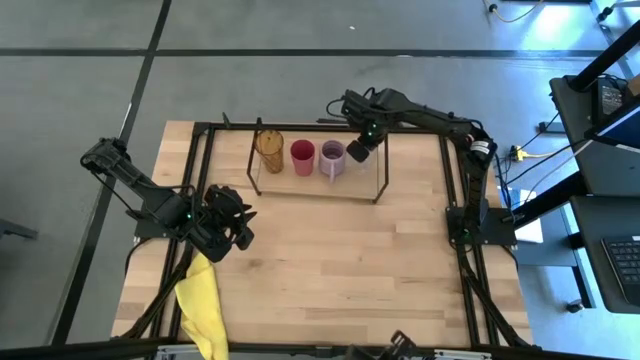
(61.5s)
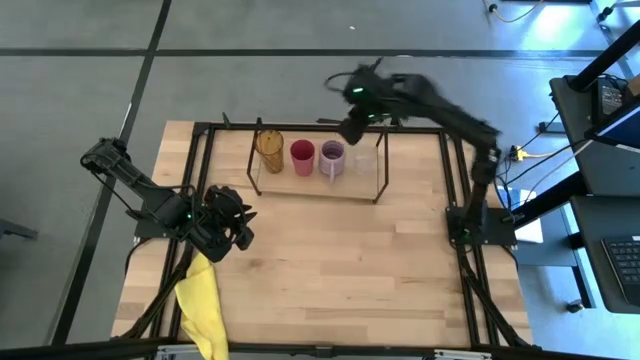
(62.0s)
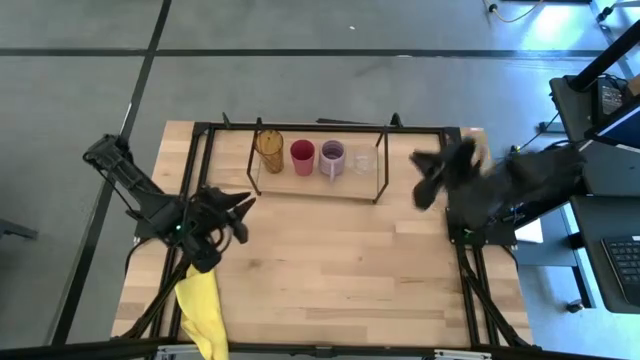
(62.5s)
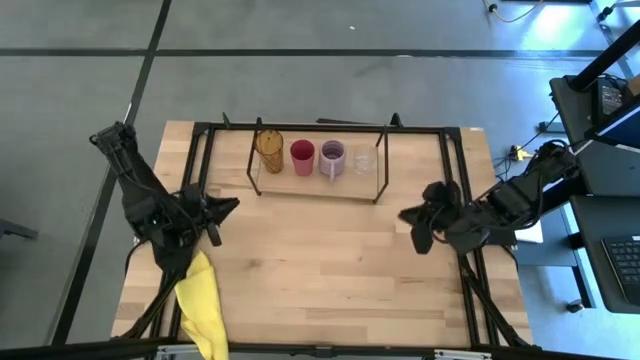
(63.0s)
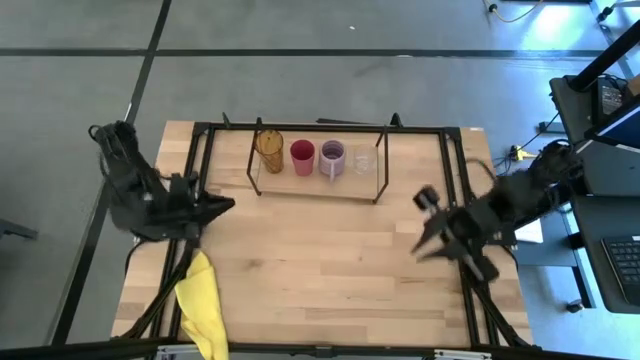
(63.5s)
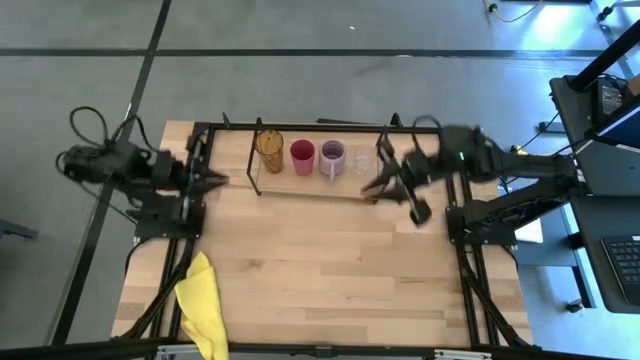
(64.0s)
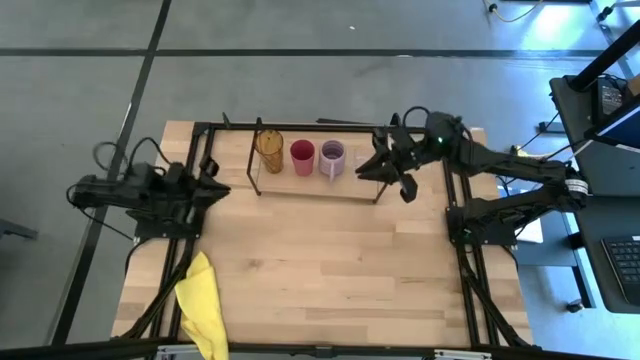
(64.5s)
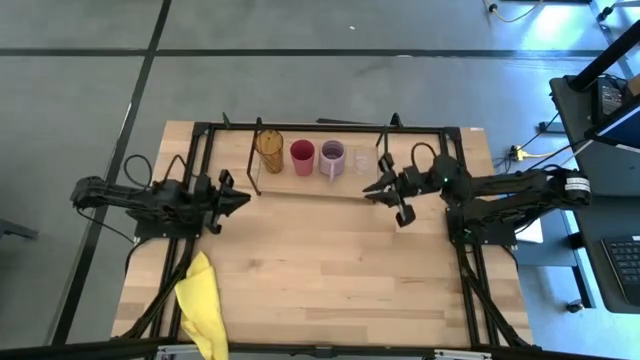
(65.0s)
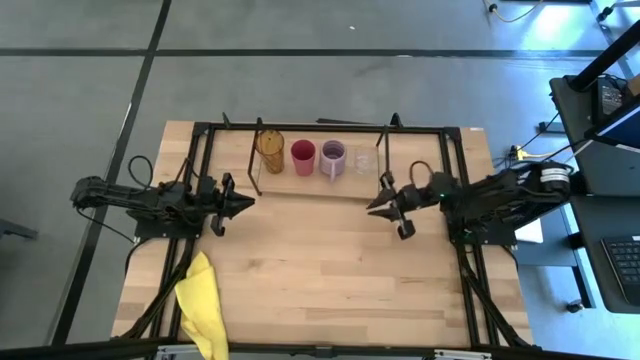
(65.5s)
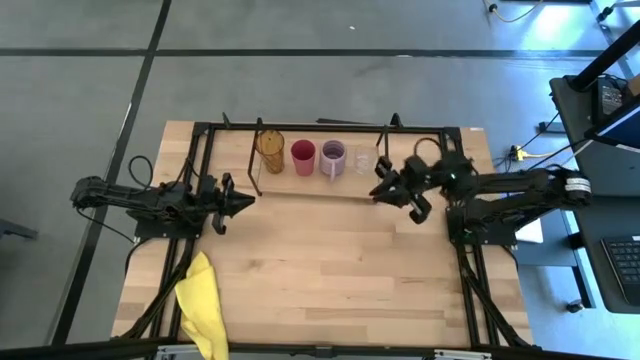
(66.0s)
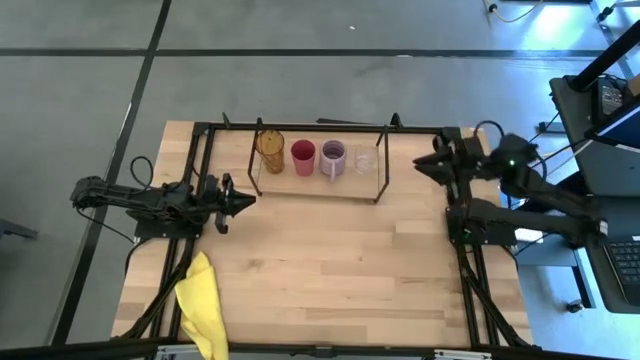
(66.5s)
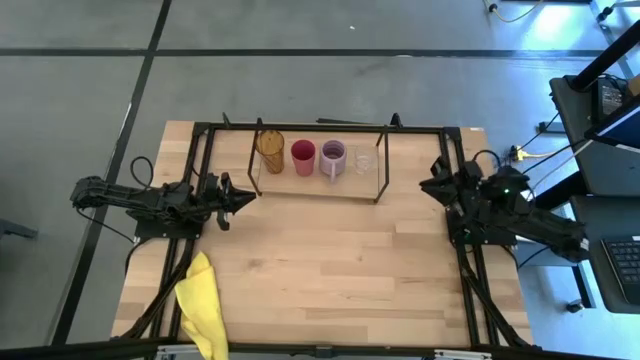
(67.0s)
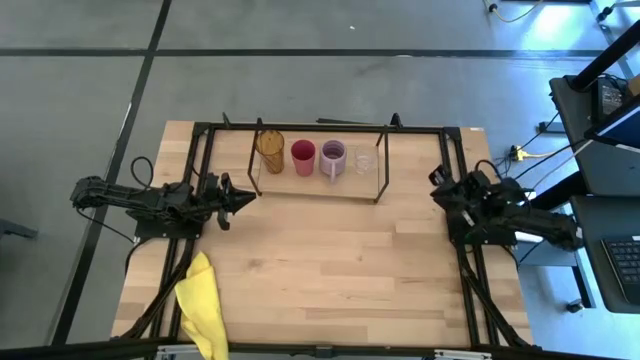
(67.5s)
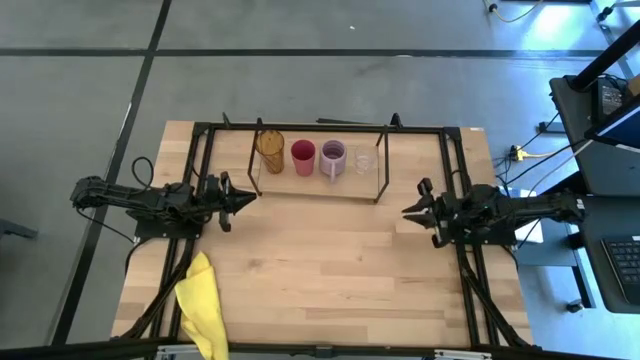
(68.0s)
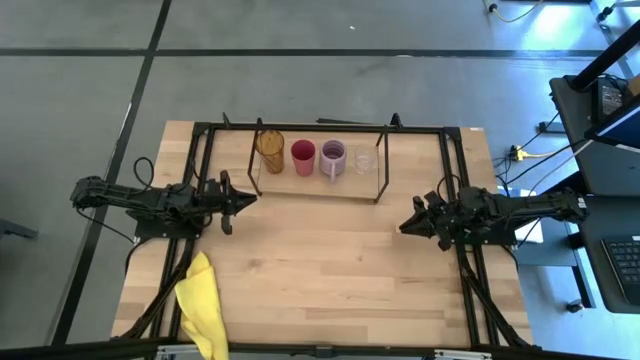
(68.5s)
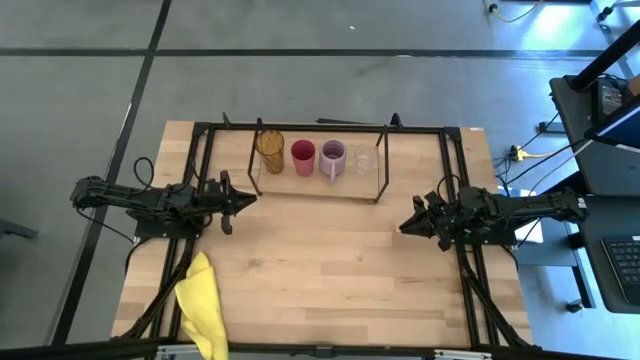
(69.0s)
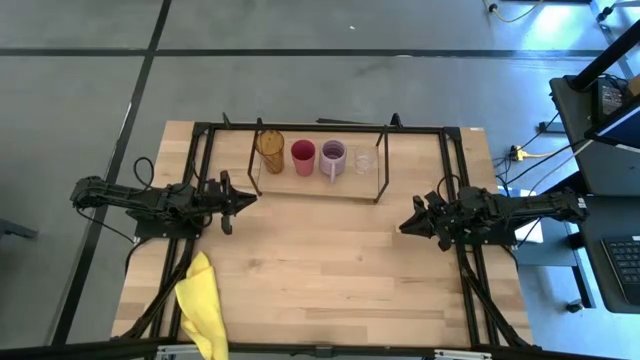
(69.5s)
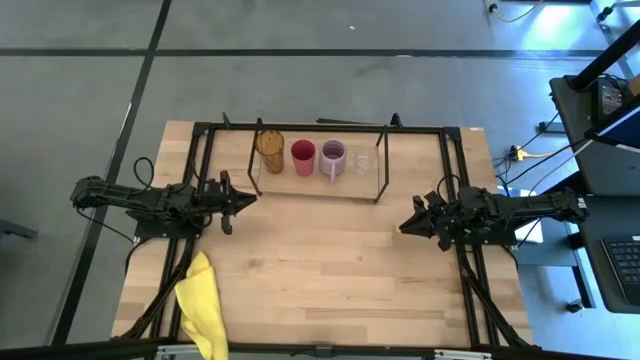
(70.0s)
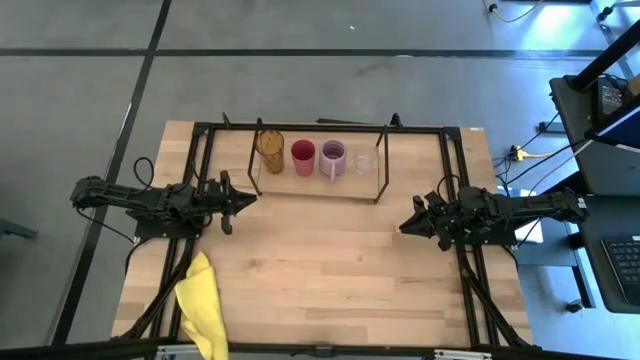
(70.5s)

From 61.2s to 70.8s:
Task: Stack small to large cups/mugs on shelf
Return to Home Position

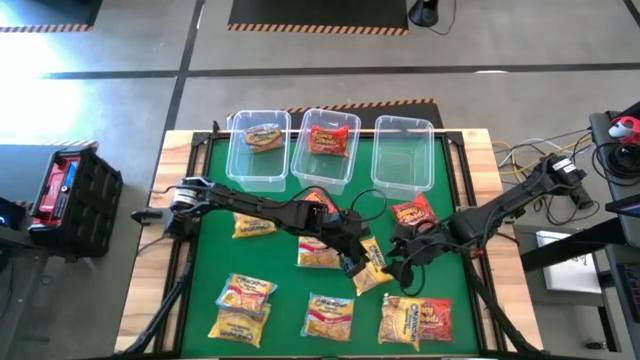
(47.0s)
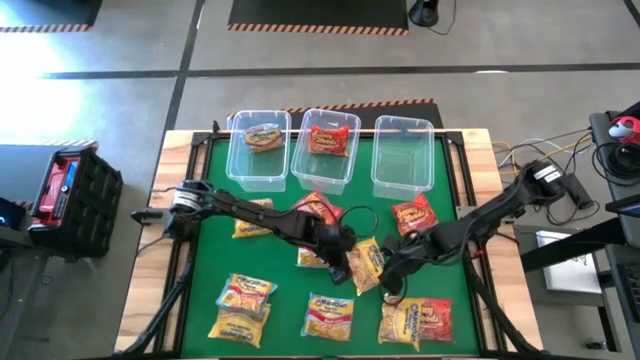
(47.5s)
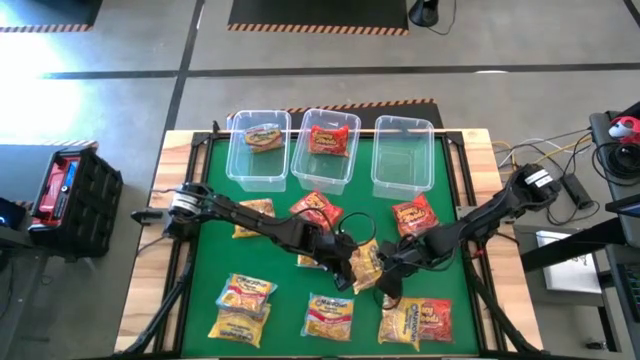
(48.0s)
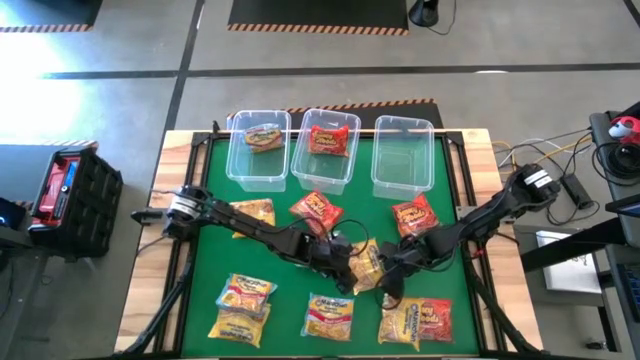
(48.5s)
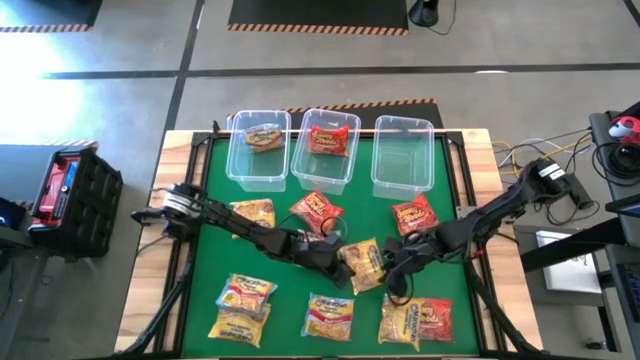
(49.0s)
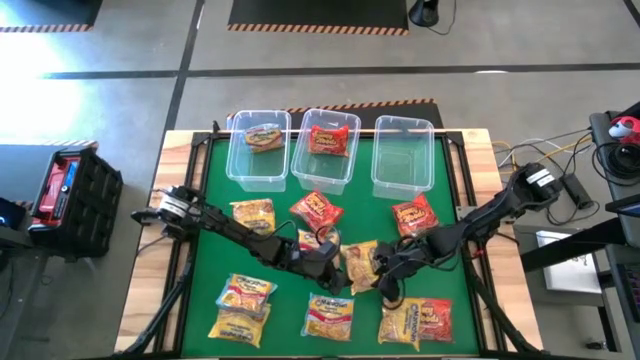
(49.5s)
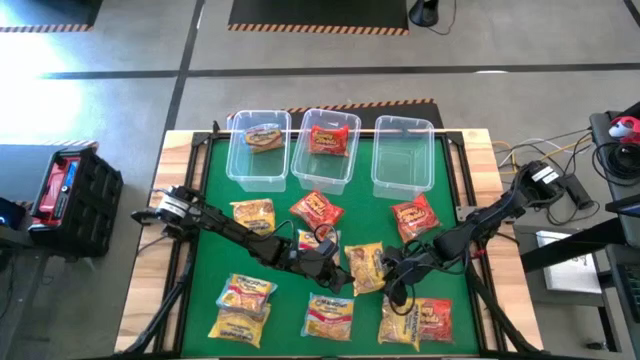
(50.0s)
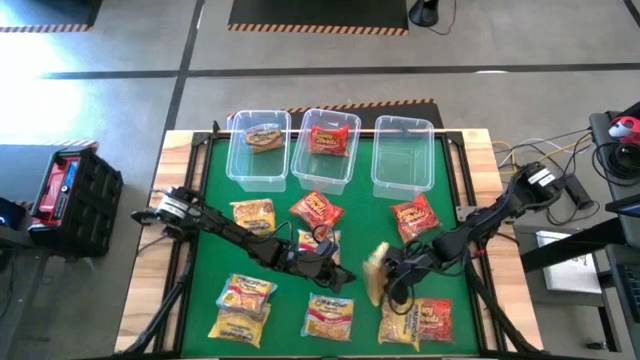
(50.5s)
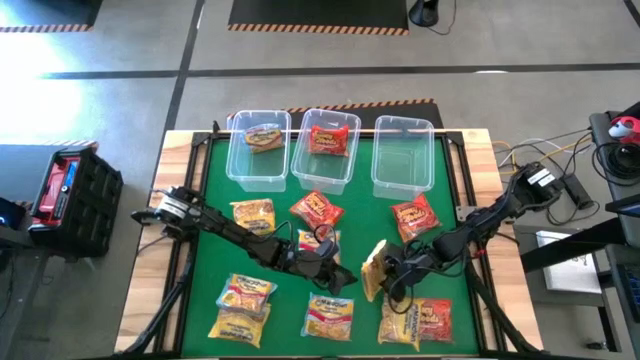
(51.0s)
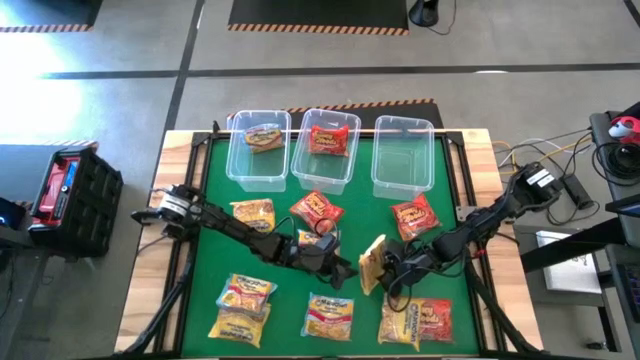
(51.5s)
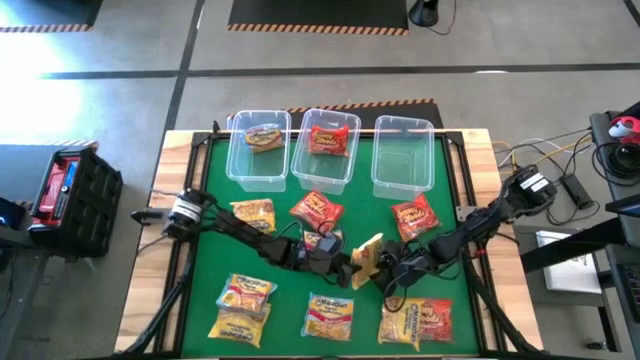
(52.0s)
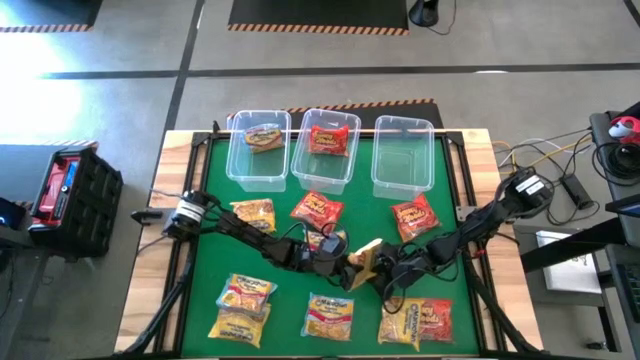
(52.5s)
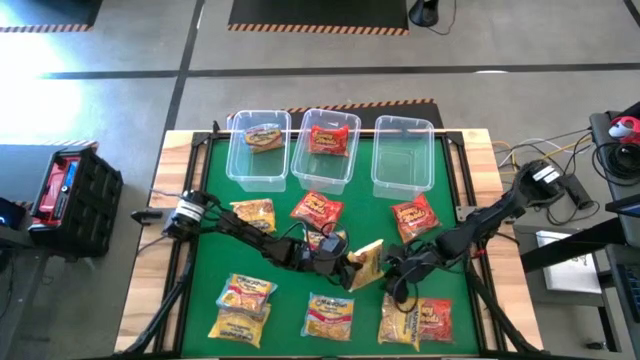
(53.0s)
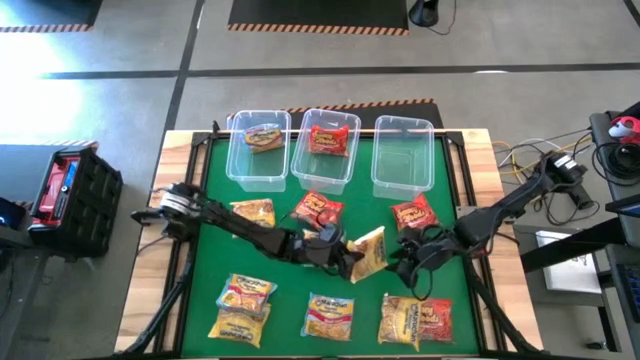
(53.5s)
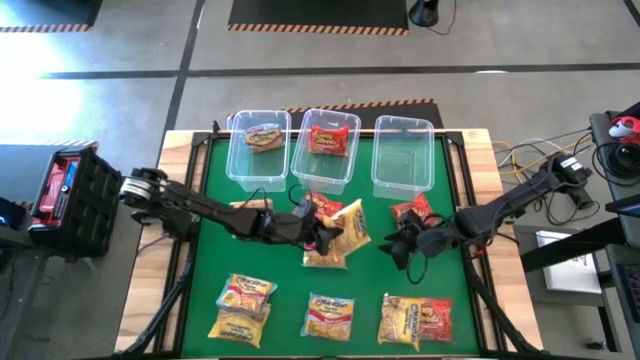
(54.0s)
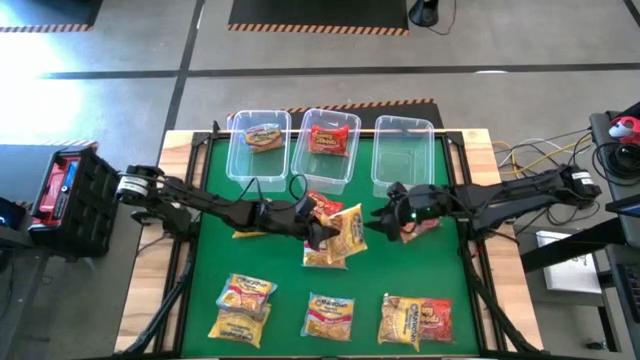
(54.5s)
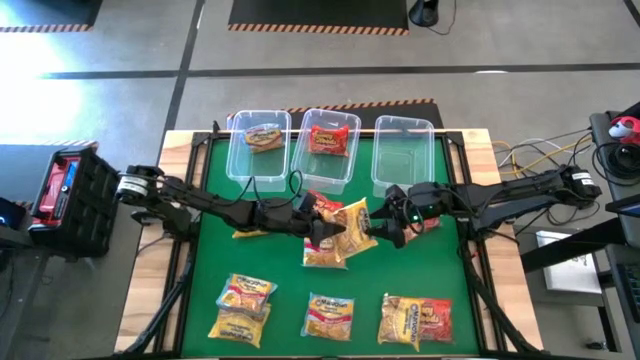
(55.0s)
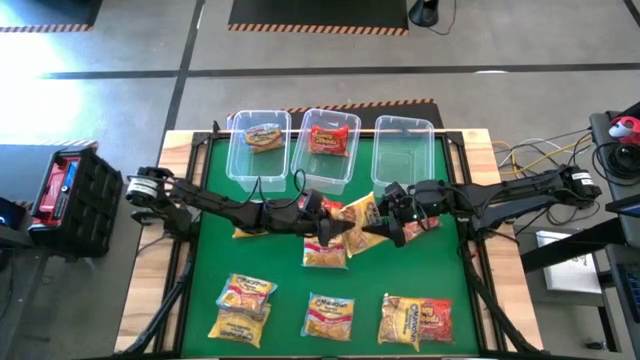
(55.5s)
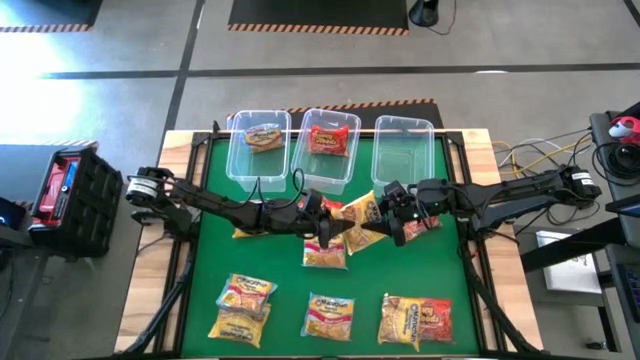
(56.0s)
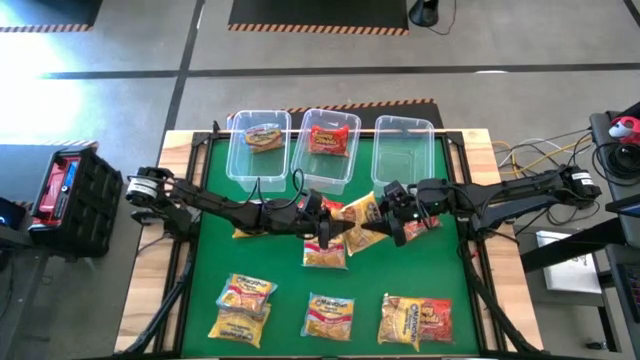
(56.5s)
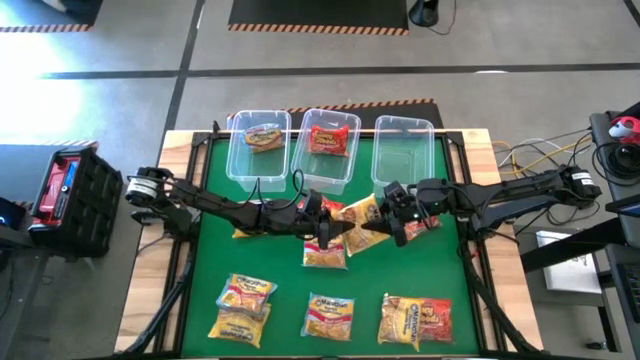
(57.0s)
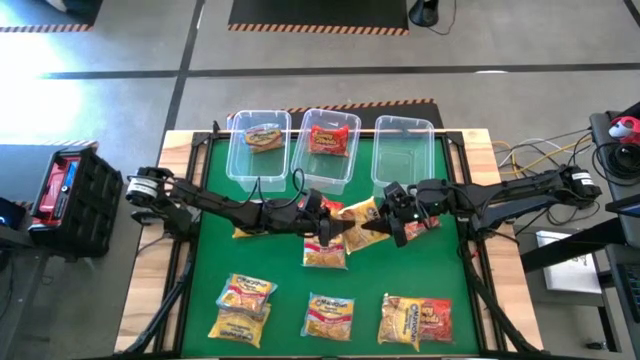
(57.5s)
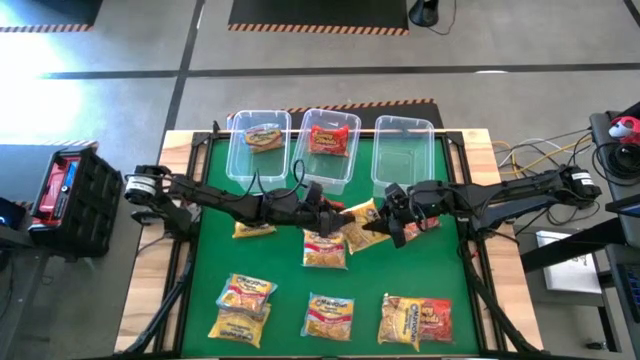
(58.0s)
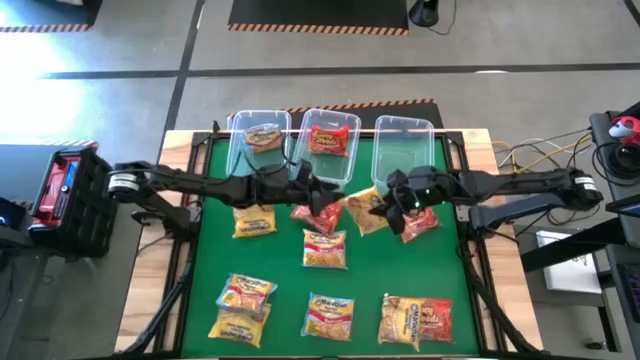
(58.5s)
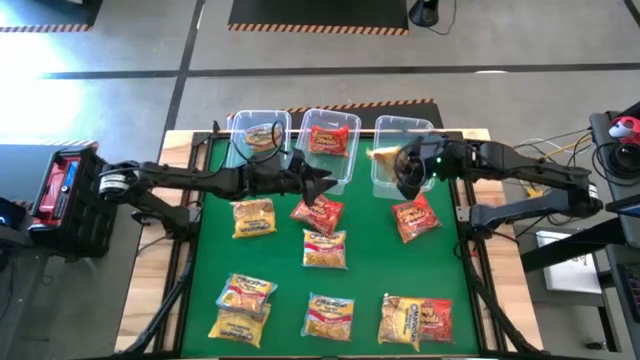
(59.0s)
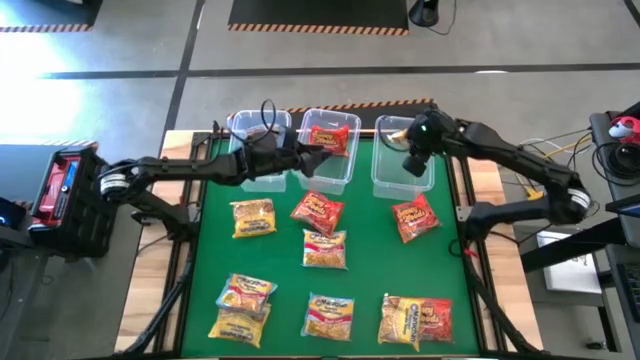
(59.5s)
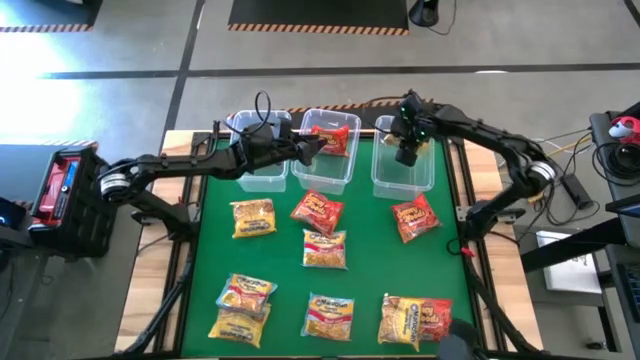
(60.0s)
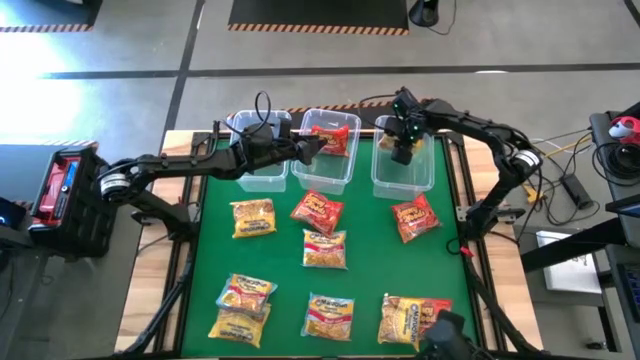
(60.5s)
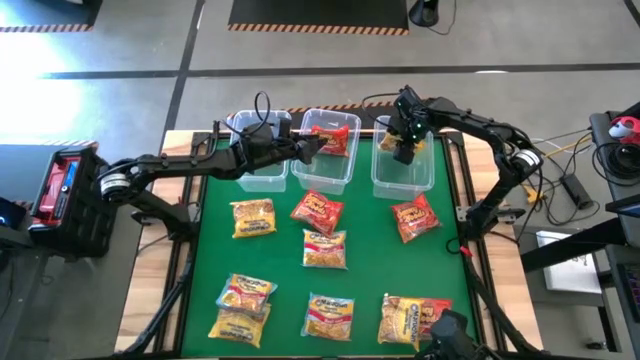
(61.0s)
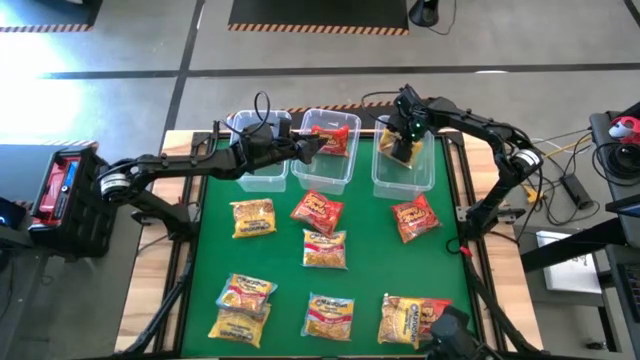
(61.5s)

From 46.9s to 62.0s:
Task: Sort Maruchan noodles
Put the top right yellow noodle pack into the top right transparent bin
